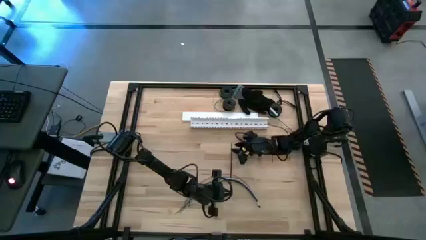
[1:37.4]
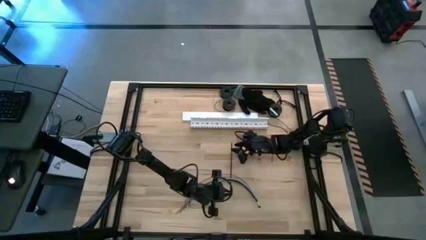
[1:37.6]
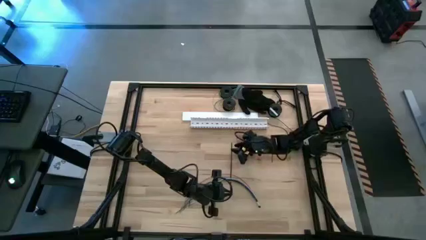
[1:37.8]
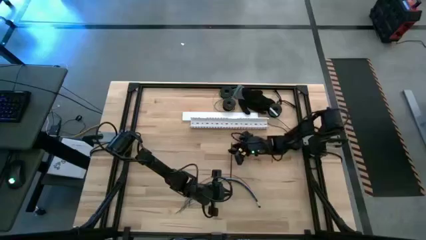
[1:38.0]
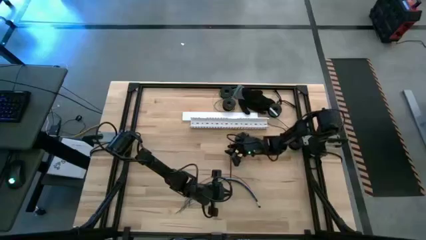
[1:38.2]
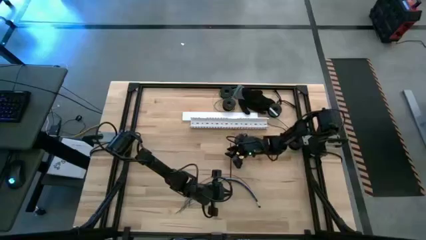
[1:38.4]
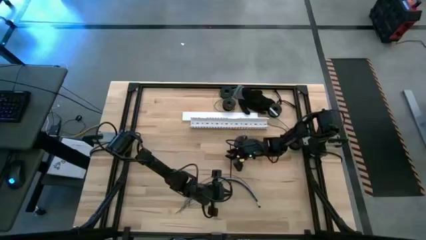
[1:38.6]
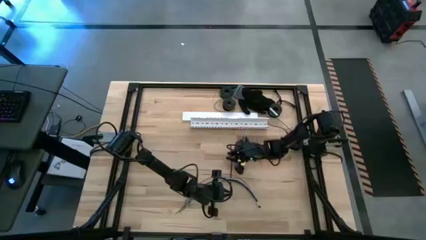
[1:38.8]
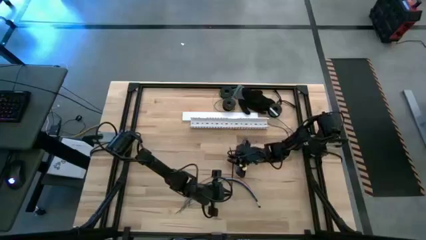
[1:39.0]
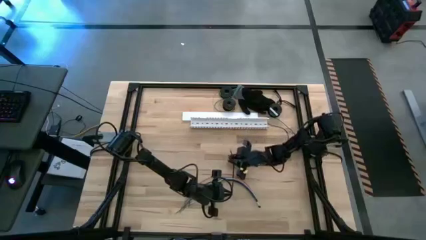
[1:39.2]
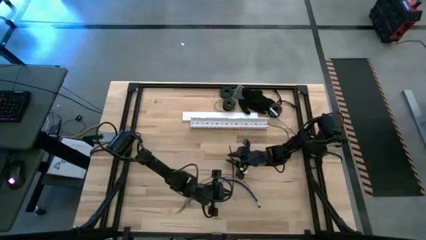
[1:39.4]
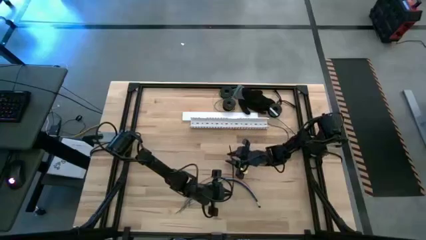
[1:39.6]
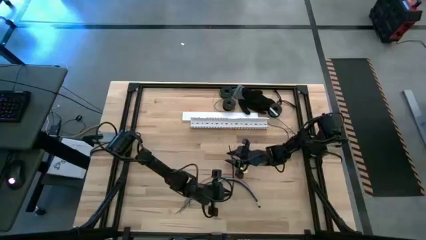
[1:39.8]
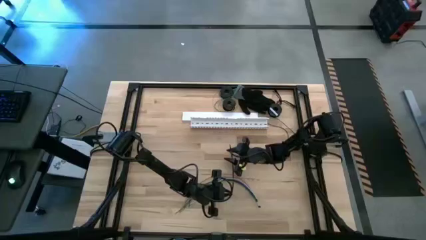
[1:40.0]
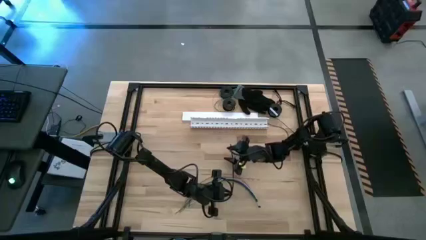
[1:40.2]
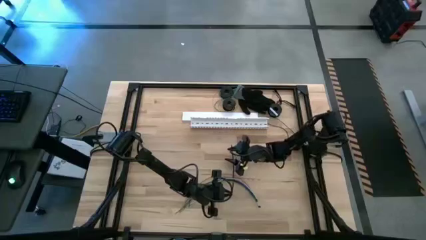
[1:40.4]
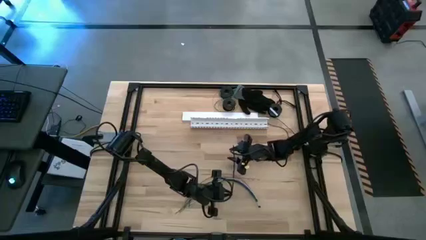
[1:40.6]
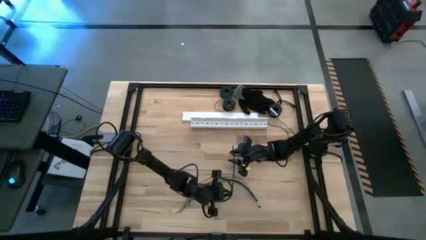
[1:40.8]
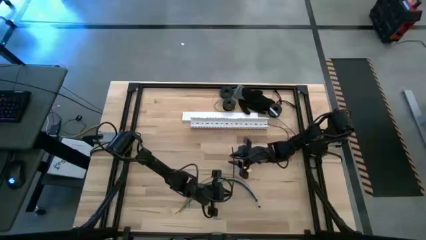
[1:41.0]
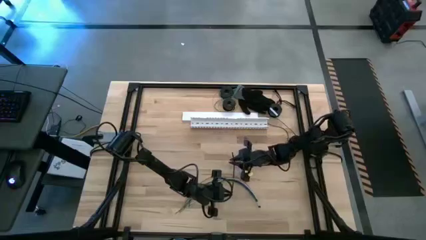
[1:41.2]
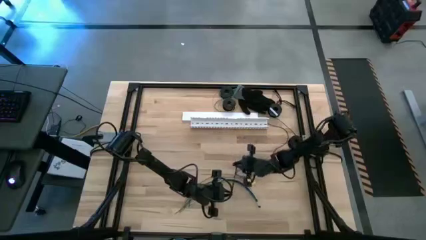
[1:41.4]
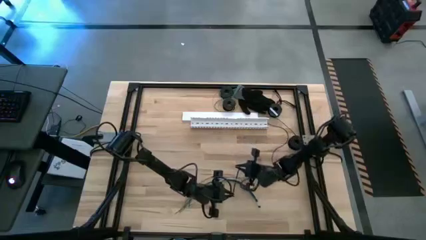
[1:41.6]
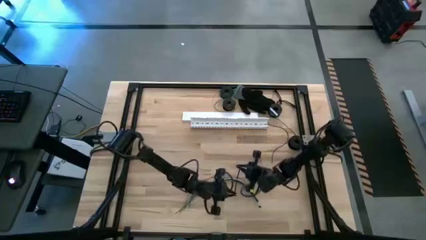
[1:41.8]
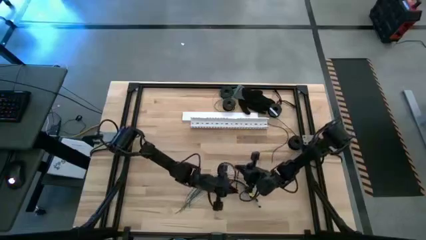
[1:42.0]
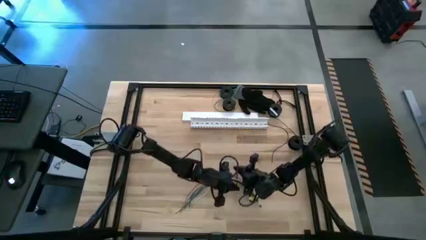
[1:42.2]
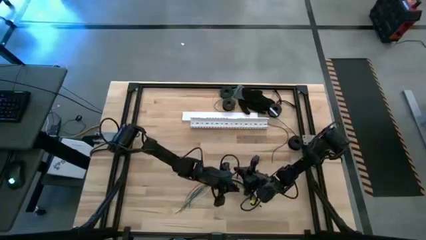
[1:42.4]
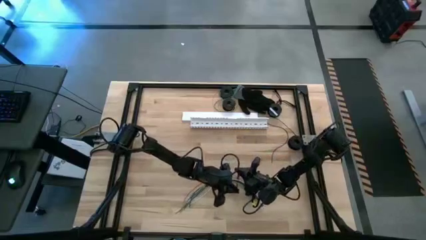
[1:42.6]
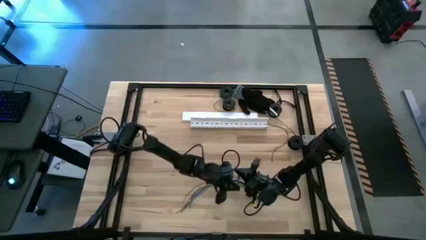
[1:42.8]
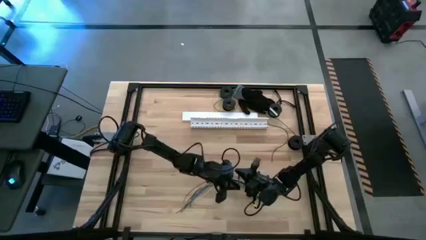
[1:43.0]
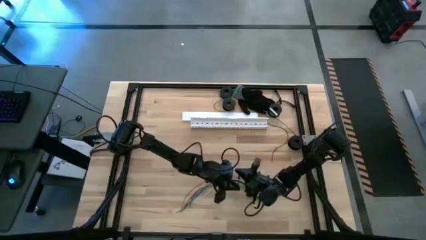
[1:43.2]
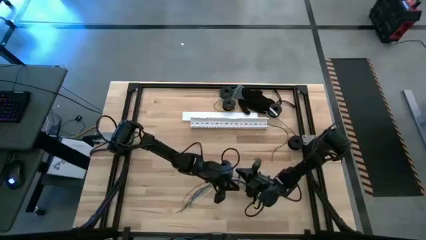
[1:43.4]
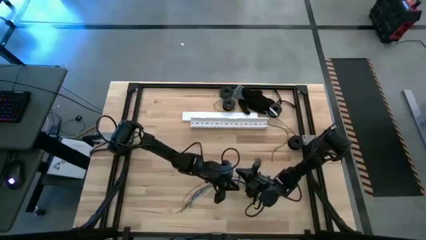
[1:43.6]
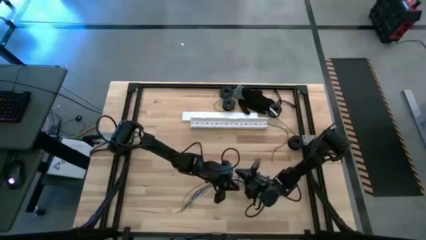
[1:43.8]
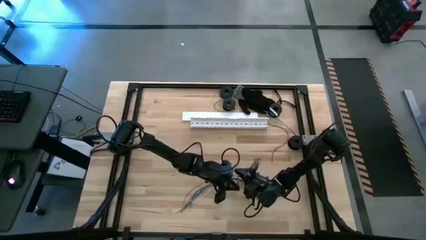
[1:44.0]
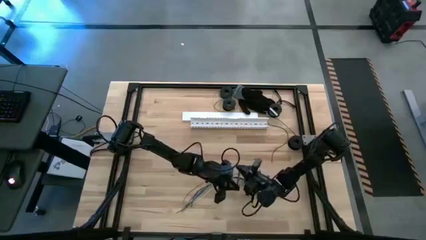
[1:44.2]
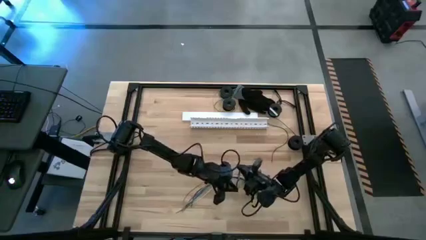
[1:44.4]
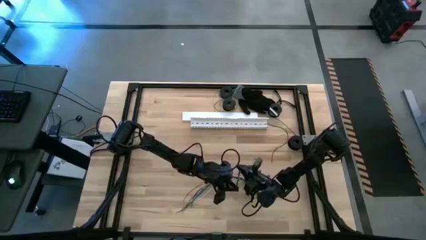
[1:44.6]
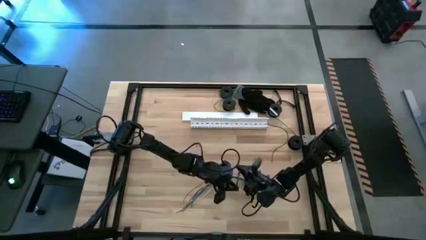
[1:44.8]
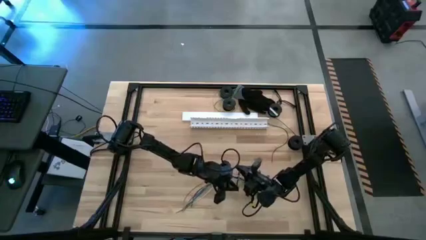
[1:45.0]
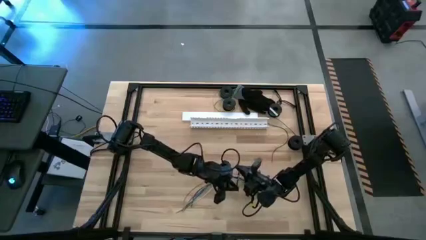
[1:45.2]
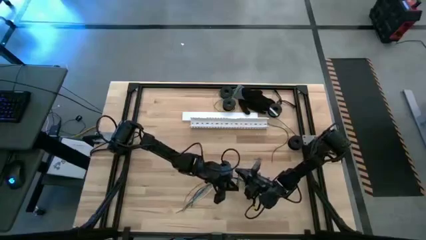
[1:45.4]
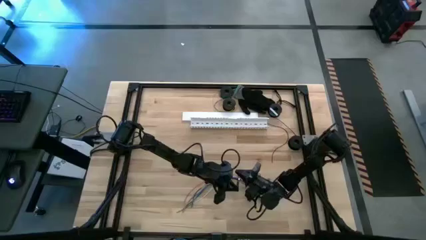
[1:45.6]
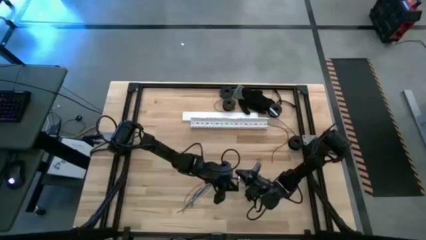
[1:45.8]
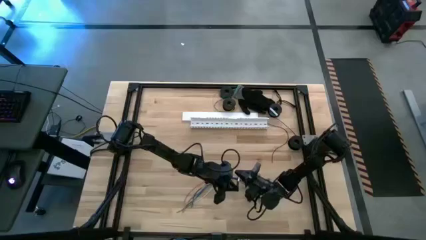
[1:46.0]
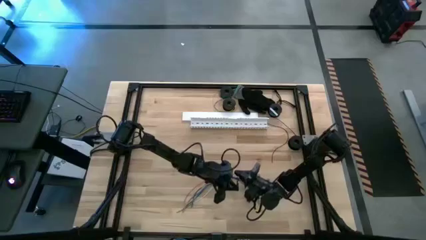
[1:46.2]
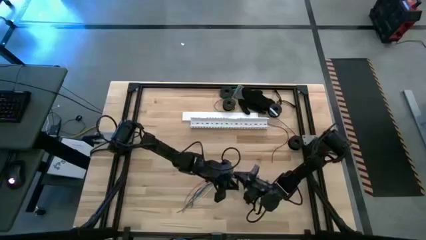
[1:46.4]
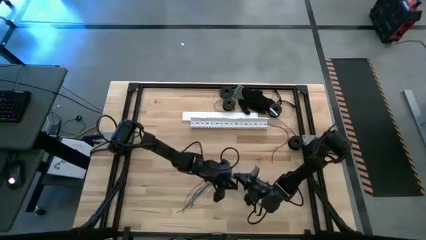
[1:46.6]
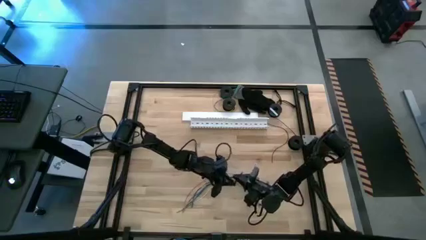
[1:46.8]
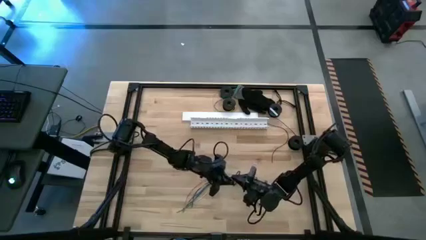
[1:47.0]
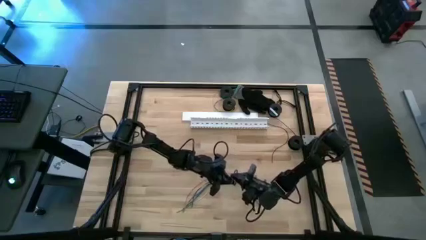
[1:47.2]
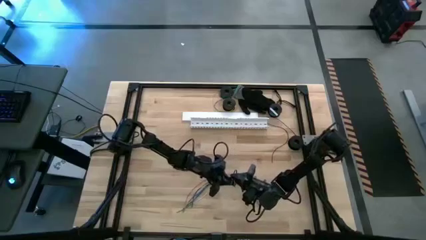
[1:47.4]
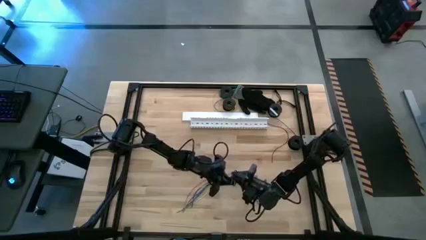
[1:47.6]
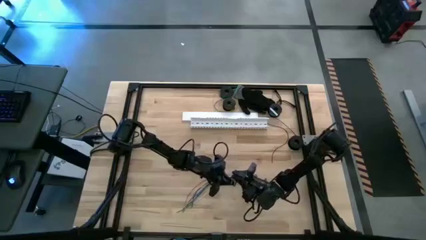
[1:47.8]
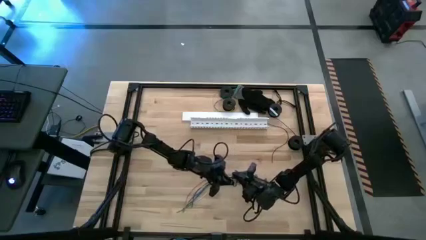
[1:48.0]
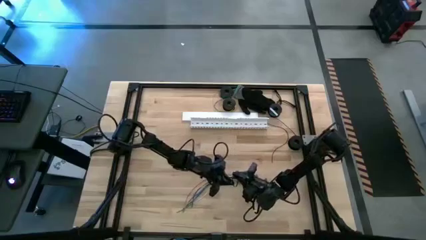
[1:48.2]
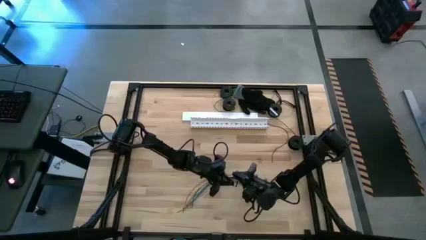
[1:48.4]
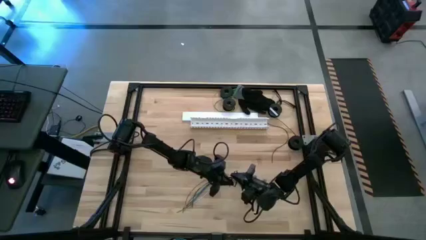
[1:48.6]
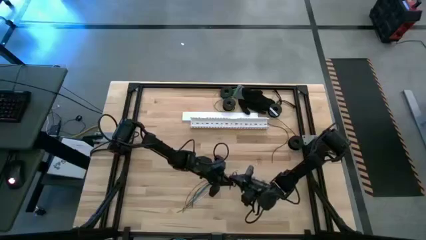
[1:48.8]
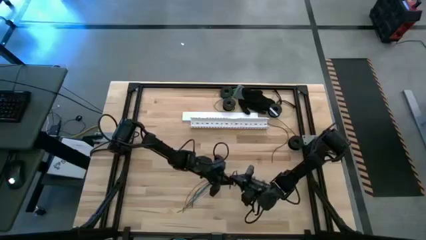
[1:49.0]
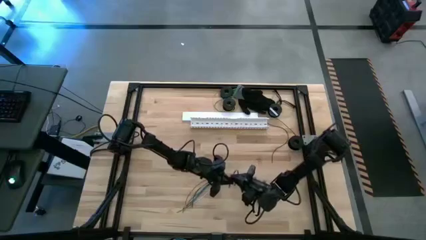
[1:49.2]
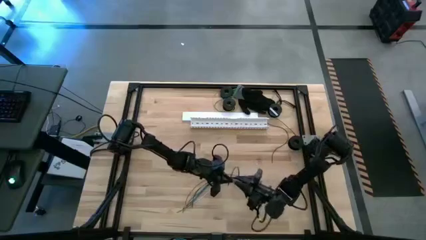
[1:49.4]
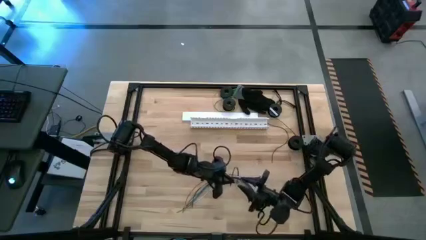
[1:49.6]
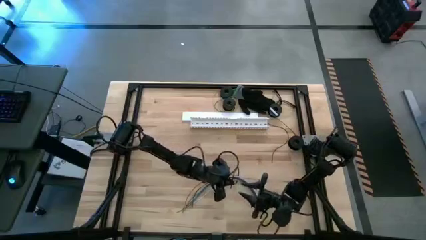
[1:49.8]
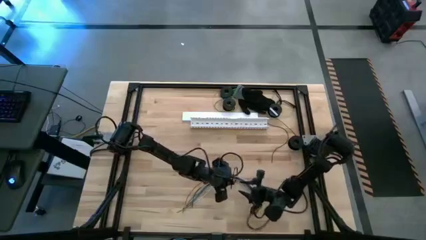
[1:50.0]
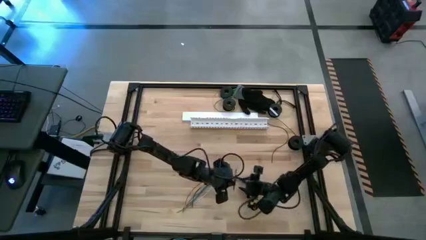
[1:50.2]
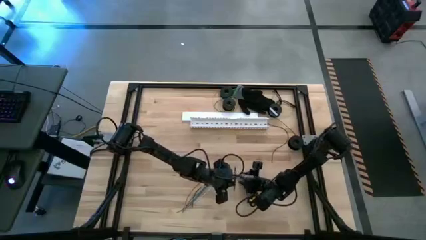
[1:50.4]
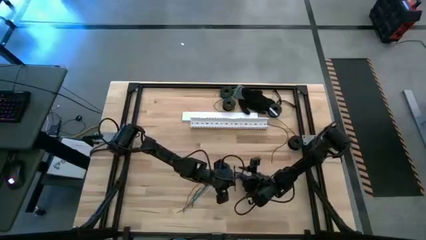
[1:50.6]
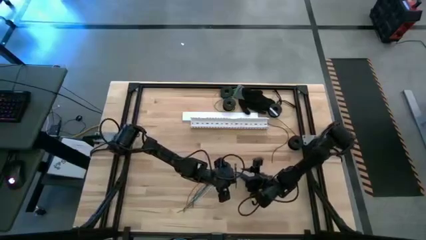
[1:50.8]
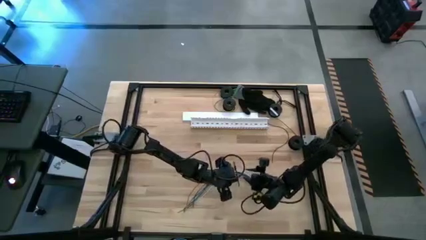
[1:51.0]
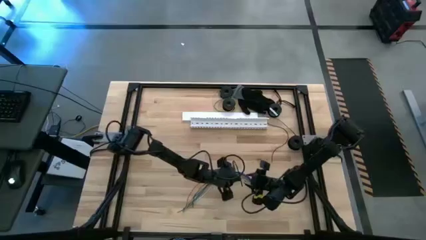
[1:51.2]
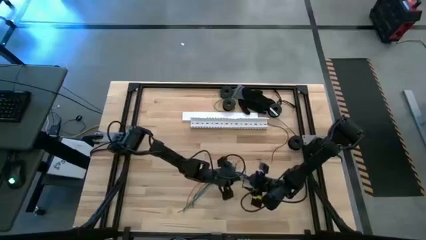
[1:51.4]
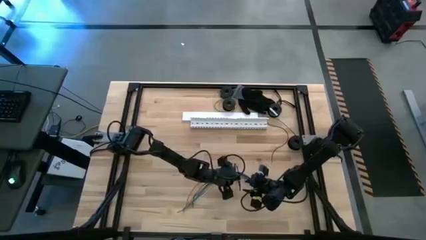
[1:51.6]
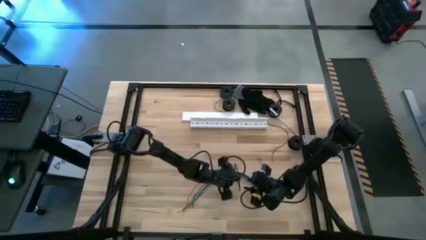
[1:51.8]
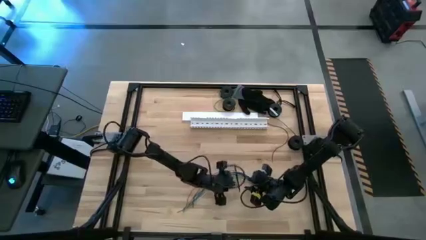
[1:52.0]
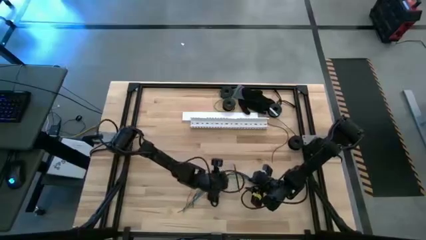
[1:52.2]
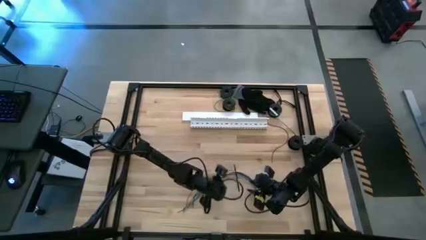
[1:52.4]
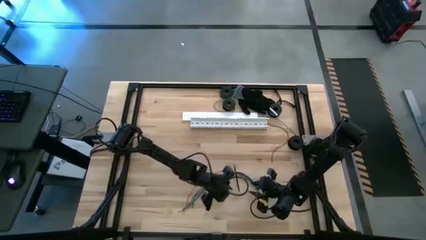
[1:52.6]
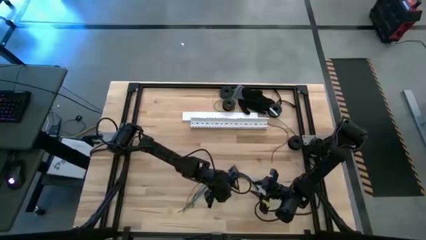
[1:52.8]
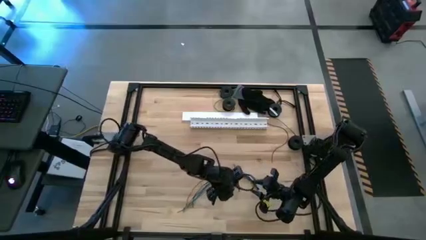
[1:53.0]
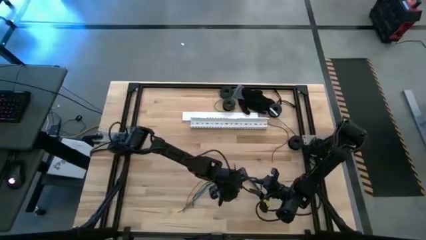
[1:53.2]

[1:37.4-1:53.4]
Task: Ziptie cables
Wrap the cables together using a black zip tie
